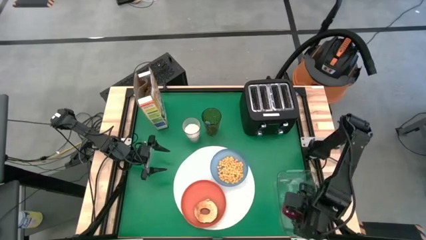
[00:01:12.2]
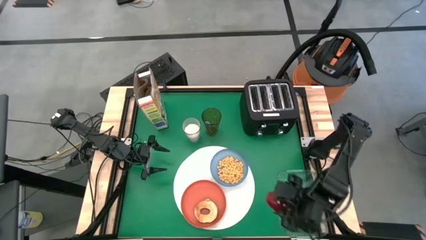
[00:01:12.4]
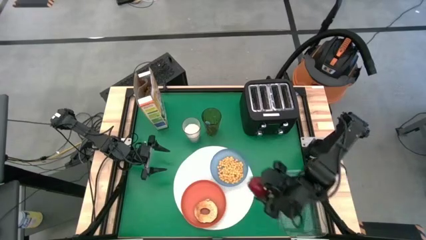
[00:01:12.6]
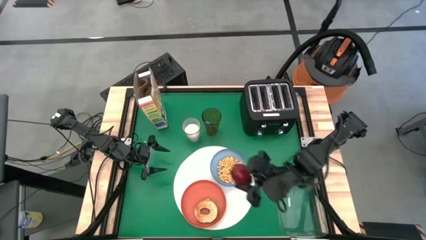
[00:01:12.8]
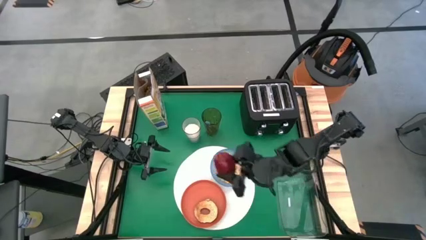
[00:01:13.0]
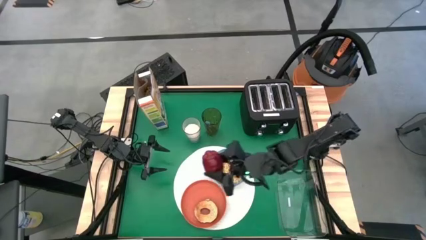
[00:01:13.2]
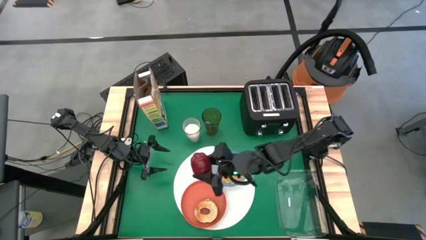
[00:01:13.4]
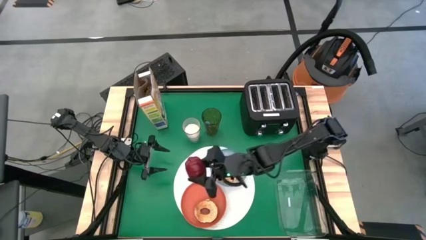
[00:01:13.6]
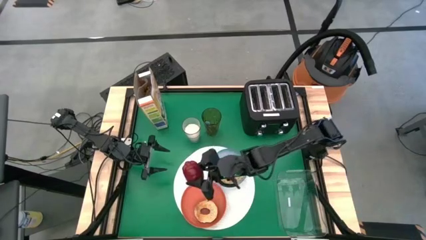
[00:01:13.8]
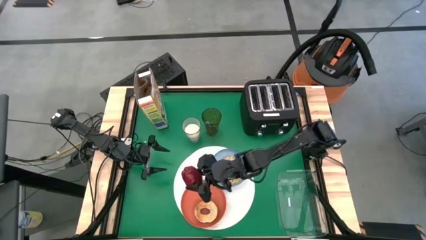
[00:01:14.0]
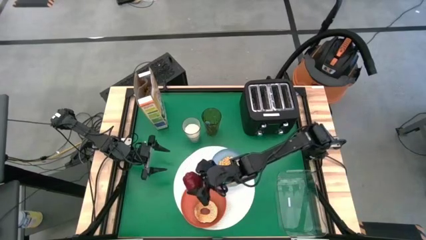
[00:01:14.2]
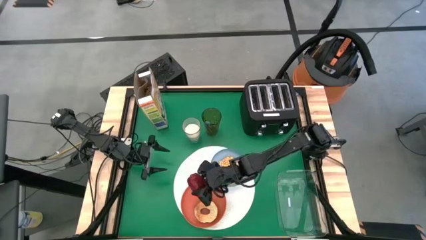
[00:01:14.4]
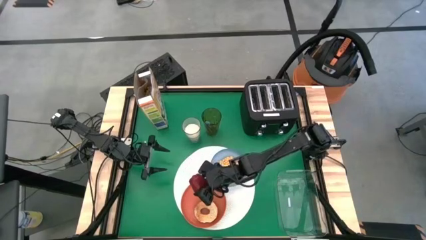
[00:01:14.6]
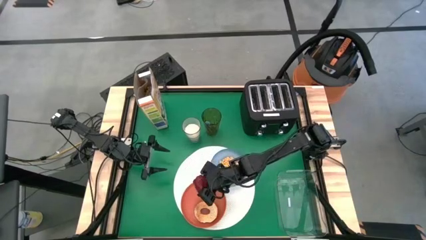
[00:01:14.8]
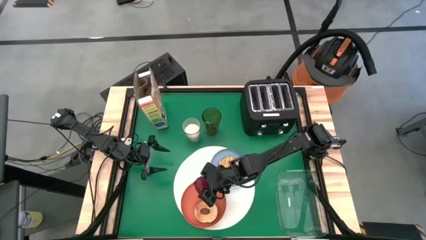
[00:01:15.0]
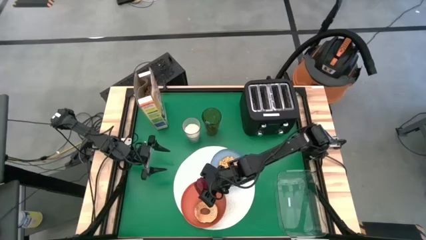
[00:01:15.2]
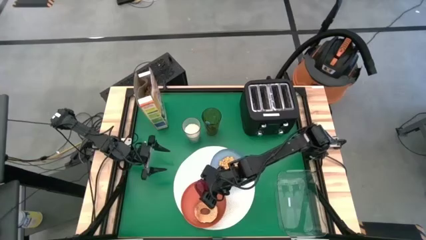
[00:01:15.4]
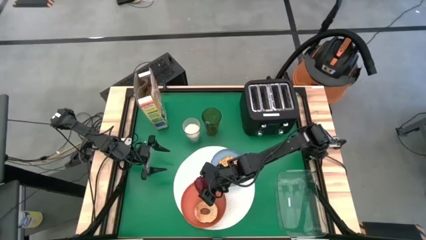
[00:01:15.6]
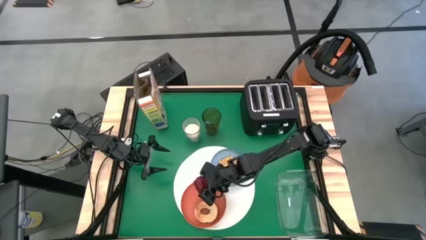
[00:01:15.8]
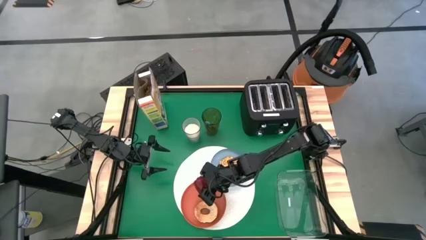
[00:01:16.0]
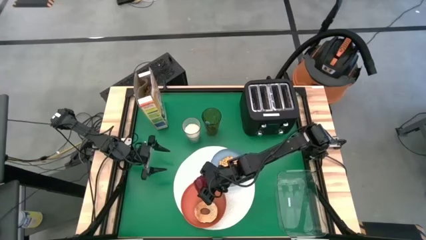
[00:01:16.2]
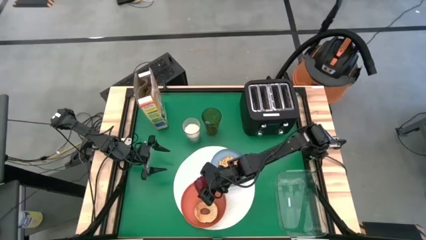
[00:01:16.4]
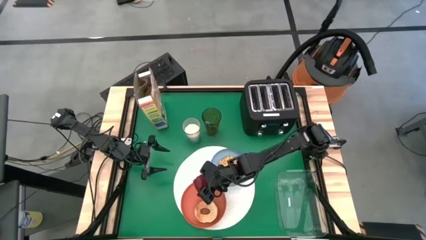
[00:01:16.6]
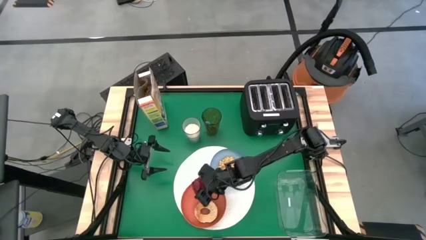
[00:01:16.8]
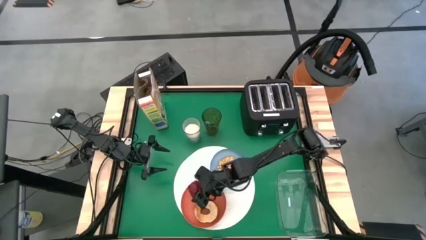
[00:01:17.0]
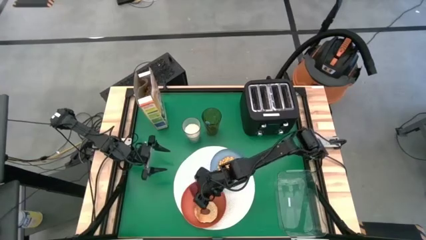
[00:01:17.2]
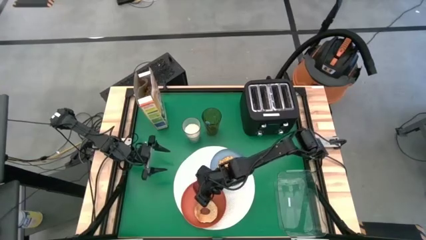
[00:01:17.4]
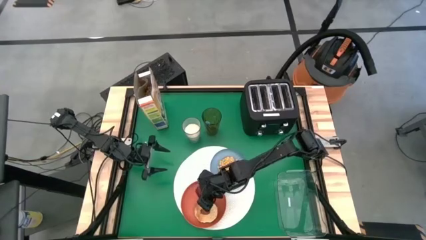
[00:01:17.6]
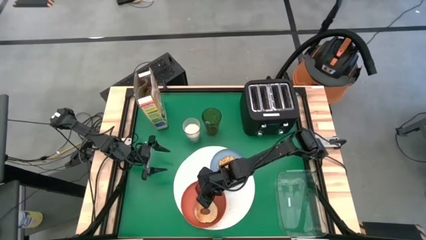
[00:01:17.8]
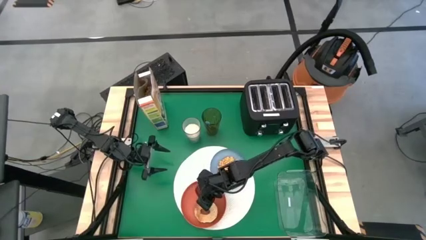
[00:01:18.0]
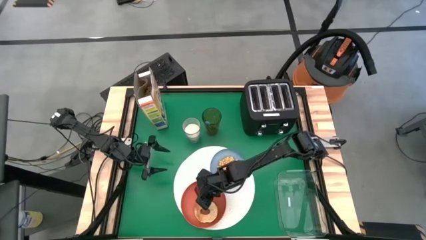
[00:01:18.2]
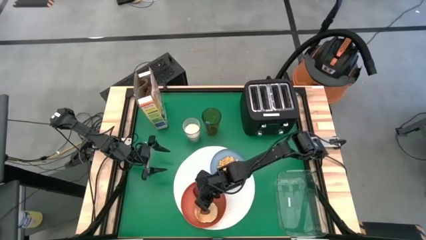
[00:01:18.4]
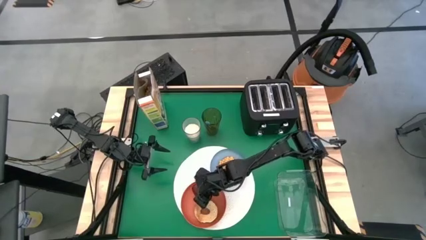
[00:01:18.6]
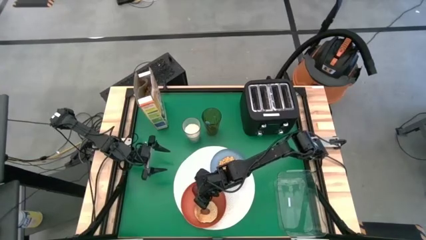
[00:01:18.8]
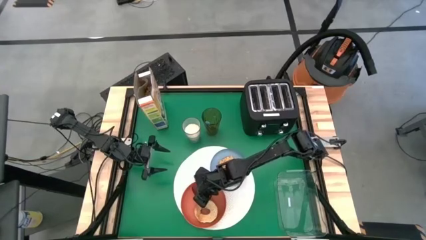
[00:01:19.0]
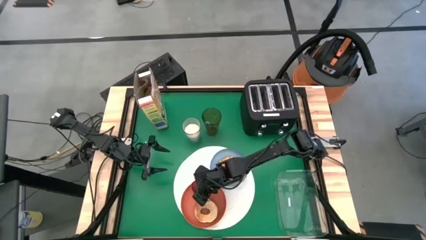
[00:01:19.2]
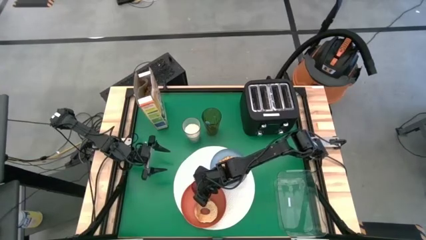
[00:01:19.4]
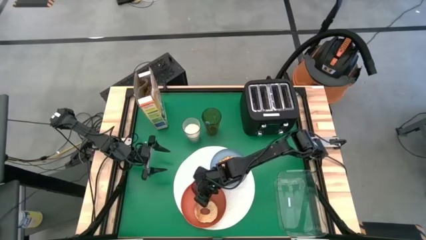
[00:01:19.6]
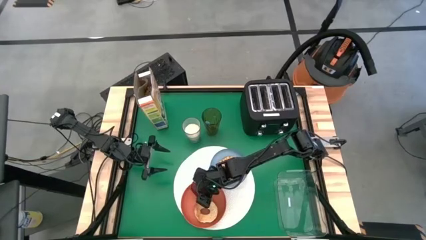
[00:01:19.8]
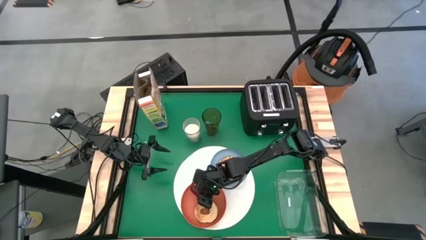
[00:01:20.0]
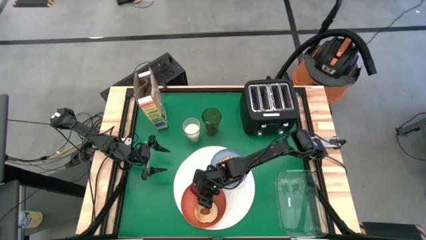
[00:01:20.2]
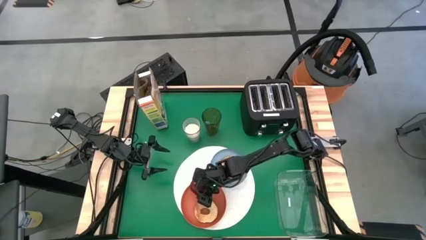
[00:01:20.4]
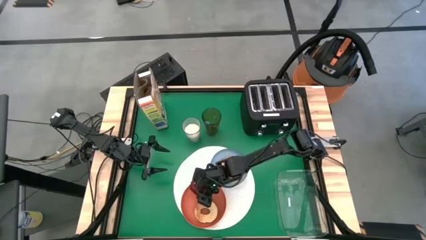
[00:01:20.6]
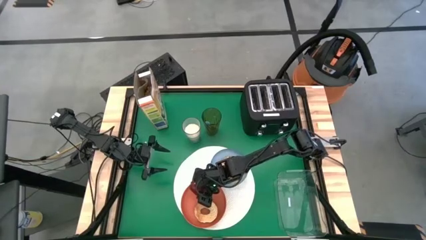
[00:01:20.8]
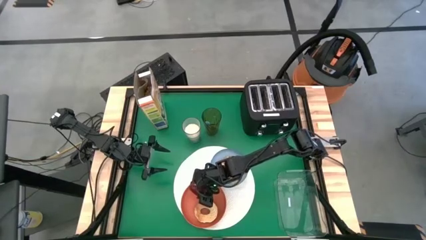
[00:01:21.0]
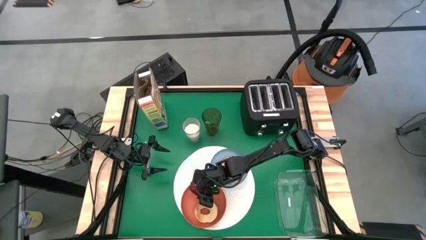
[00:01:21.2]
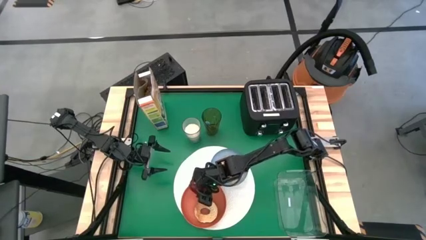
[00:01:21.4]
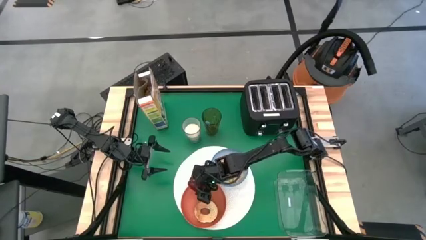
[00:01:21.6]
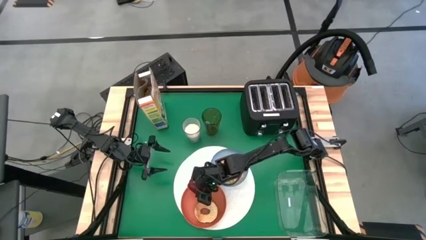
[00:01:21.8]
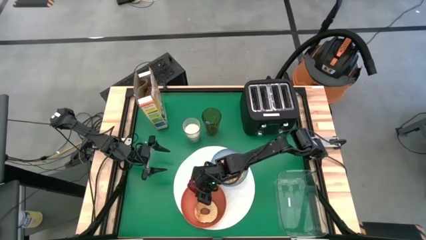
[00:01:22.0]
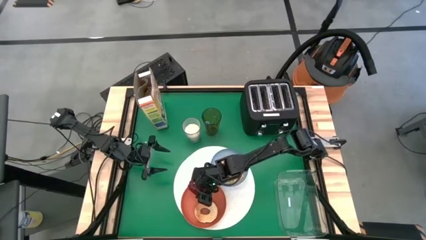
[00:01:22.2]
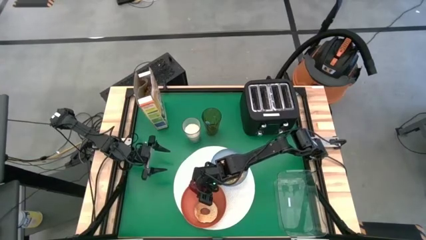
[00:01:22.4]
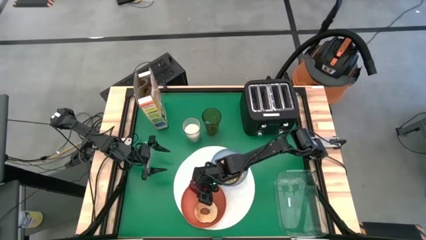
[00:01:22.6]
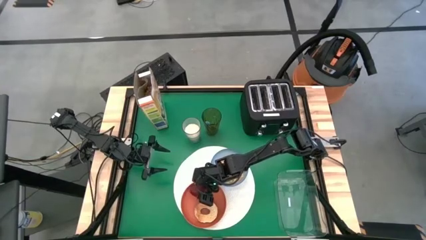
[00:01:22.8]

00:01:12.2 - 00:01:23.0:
Task: Arrange a breakfast setting
Put the red apple from the transparent bin on the orange plate

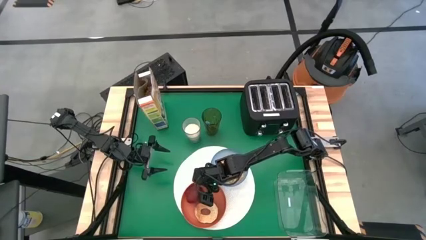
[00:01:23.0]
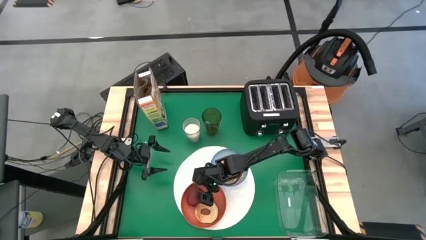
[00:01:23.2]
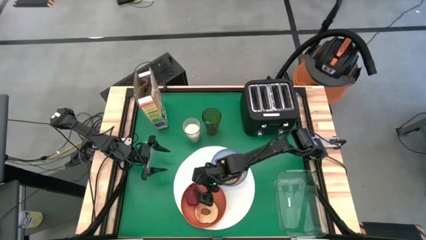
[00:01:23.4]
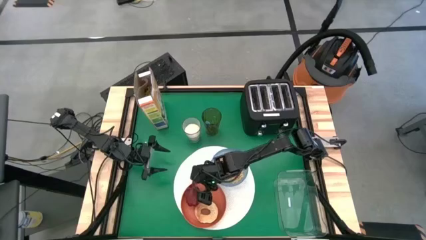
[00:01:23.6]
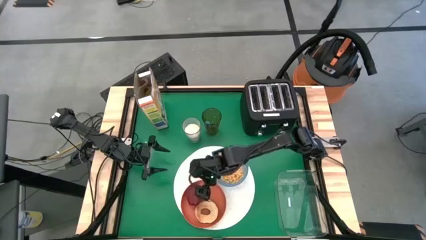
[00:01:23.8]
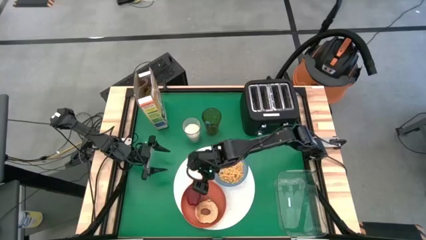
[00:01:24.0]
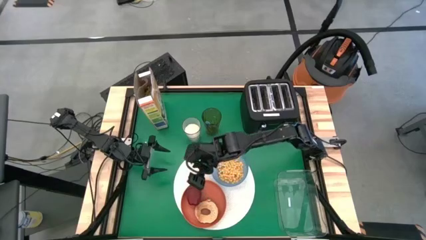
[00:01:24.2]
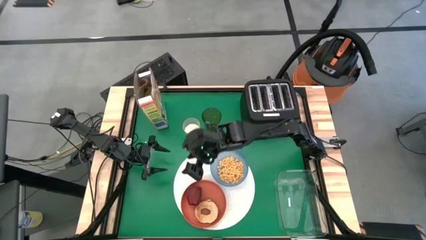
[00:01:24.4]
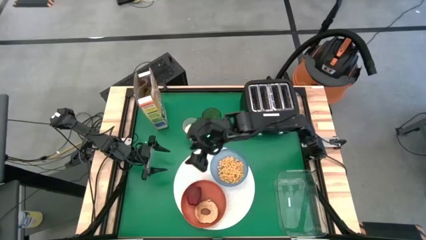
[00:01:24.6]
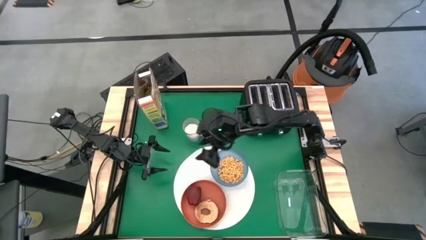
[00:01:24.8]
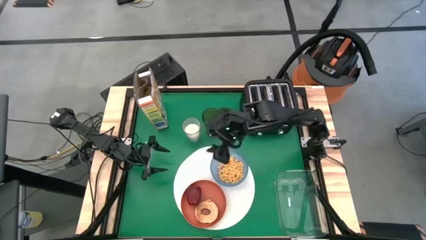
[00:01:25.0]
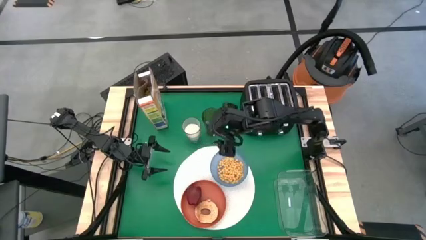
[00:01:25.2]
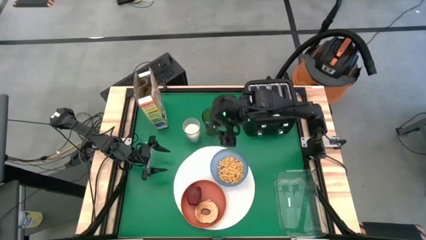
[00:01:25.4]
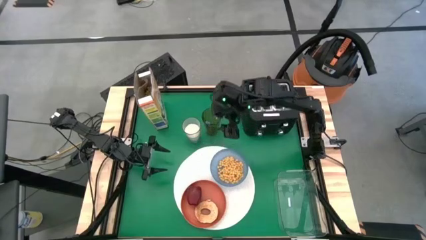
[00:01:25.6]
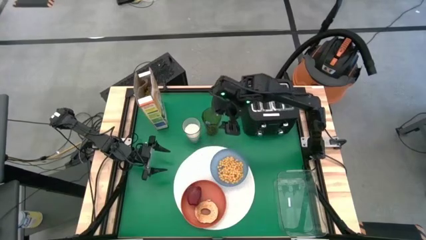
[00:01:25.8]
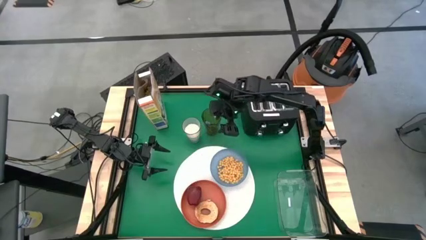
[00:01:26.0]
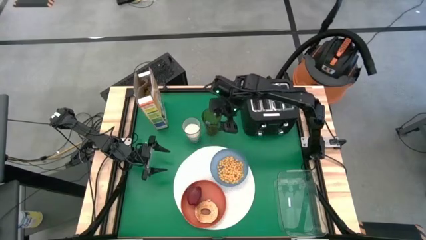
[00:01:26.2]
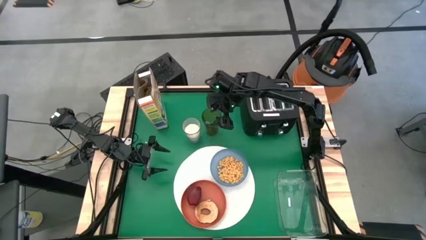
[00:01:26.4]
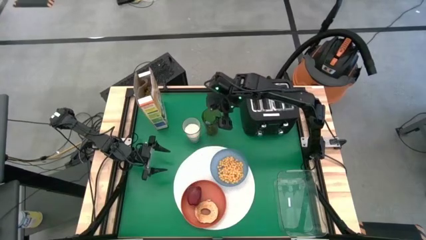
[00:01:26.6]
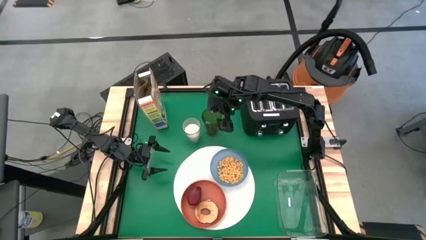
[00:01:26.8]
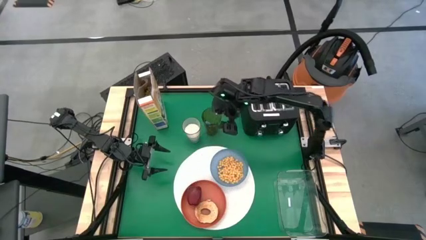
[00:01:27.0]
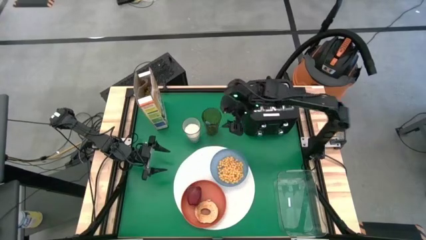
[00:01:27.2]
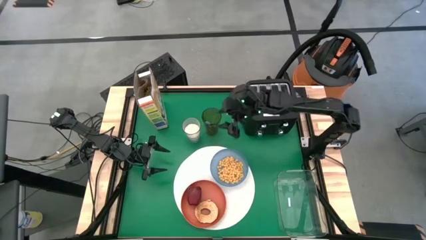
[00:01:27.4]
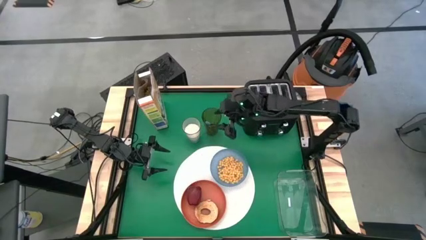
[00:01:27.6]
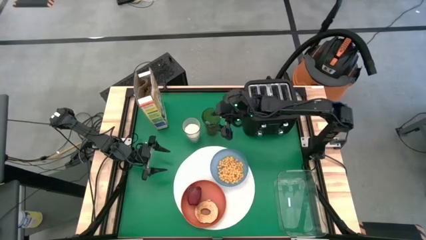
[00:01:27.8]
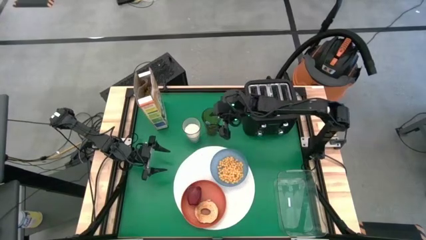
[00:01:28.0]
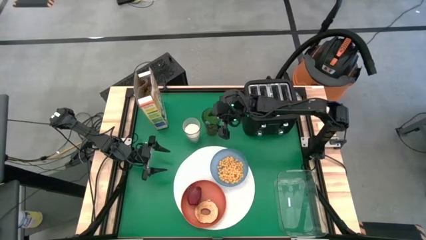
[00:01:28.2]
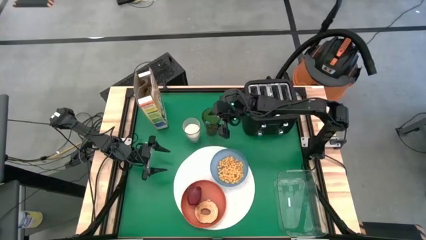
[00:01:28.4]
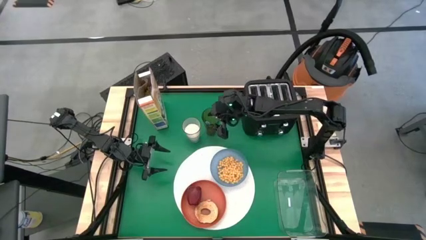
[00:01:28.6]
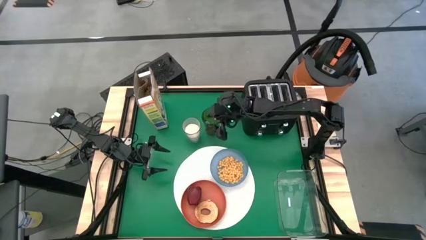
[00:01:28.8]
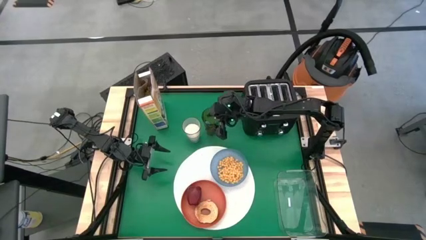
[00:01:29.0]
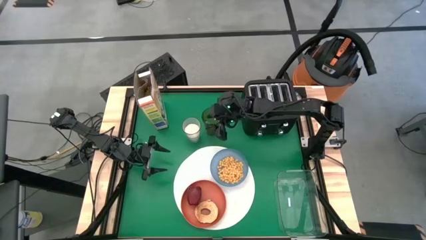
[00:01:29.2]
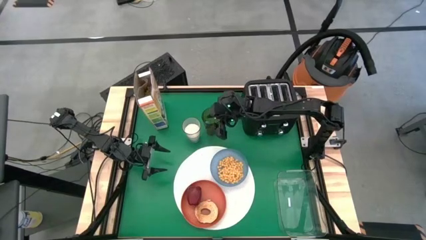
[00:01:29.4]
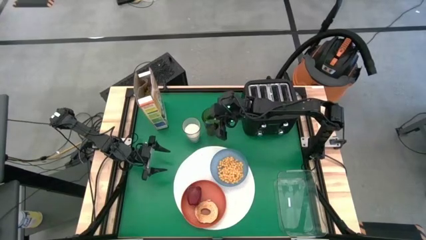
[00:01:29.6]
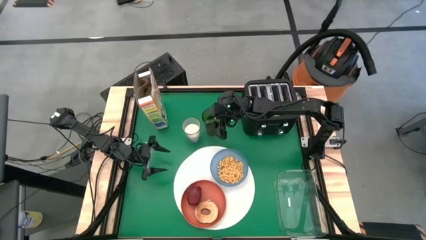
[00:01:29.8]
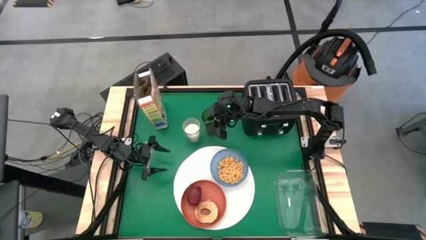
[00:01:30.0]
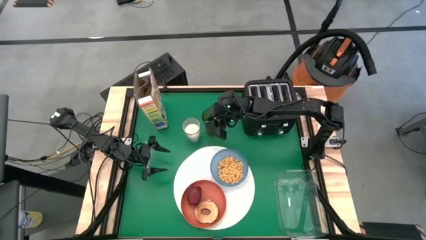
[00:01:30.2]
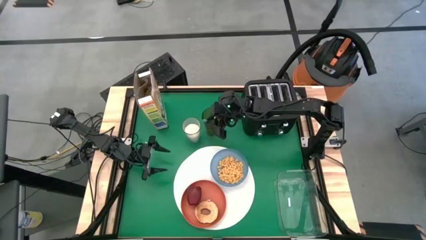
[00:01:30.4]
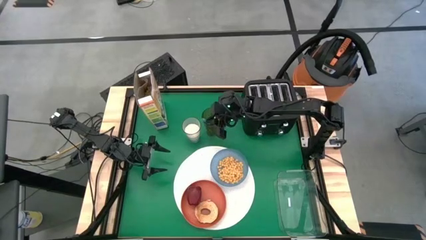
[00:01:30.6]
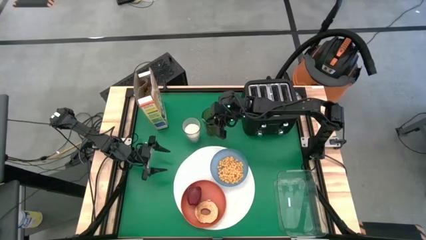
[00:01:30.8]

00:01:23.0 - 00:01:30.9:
Put the blue spoon to the right of the blue bowl on the white placemat
